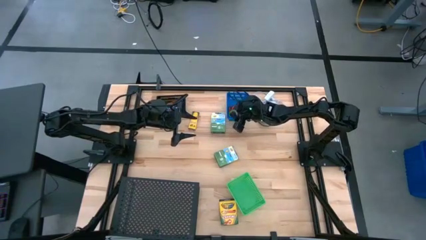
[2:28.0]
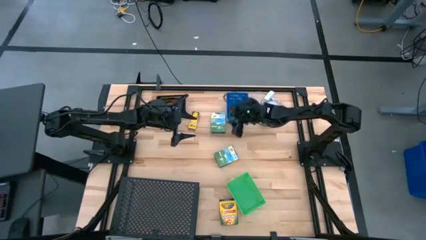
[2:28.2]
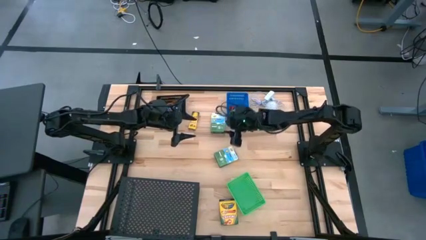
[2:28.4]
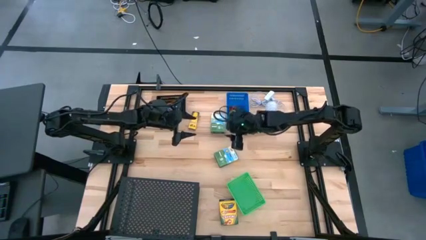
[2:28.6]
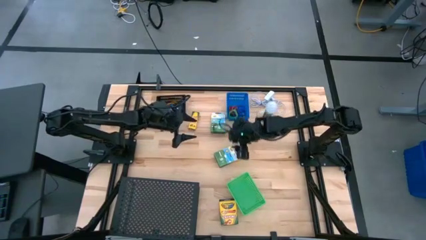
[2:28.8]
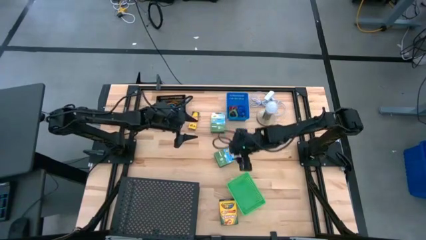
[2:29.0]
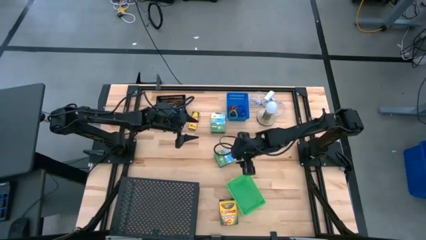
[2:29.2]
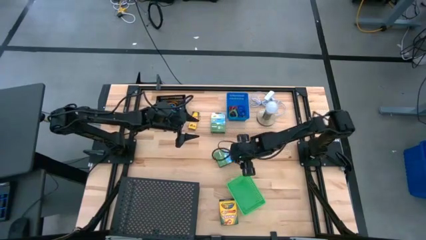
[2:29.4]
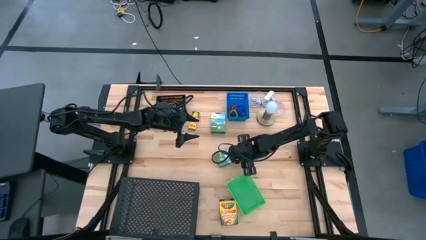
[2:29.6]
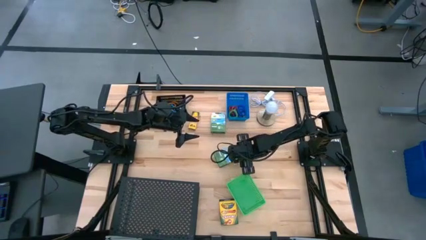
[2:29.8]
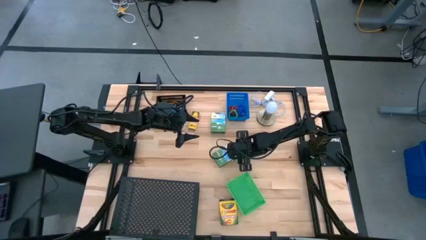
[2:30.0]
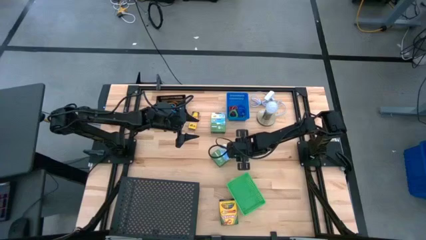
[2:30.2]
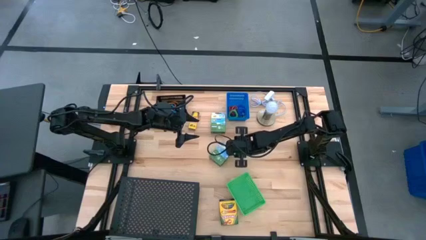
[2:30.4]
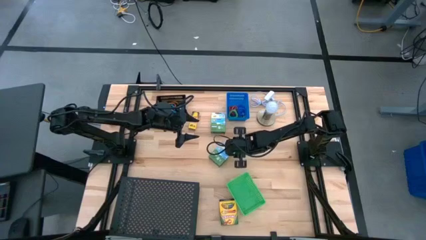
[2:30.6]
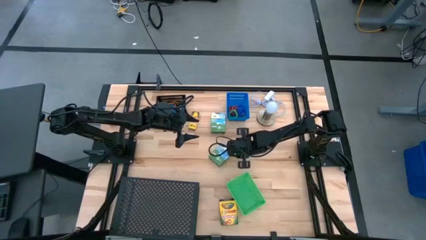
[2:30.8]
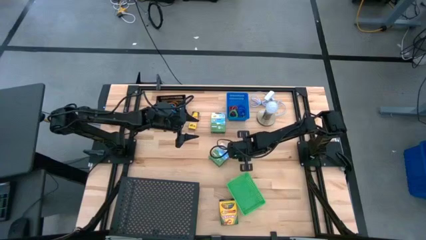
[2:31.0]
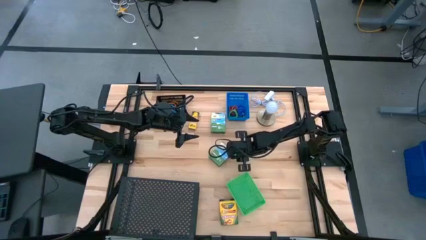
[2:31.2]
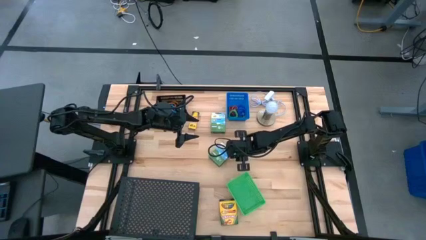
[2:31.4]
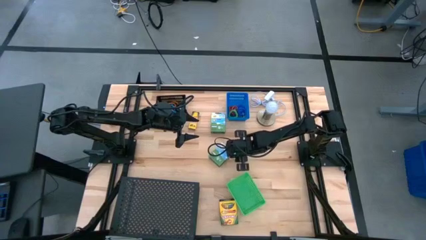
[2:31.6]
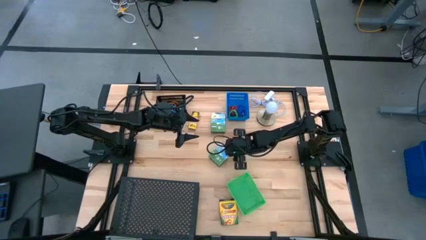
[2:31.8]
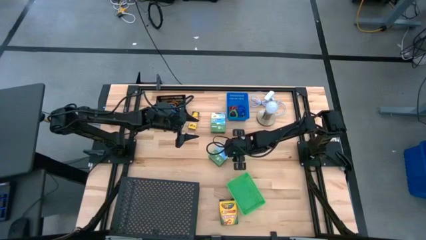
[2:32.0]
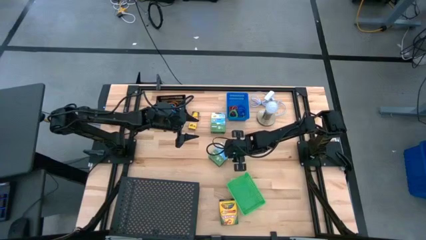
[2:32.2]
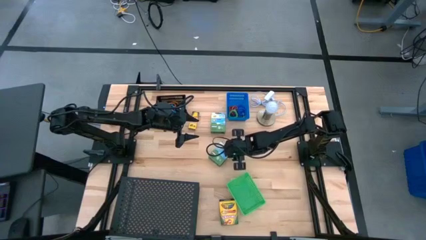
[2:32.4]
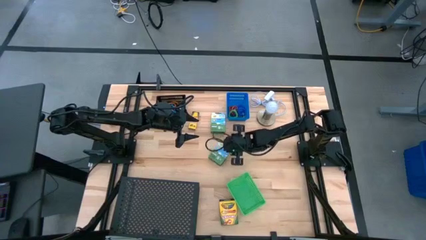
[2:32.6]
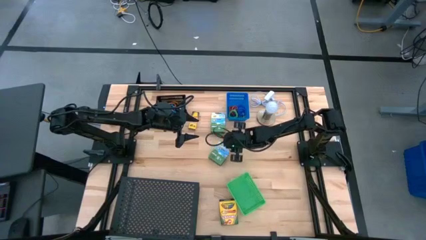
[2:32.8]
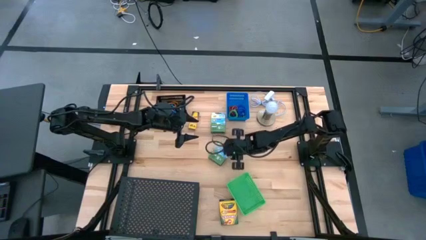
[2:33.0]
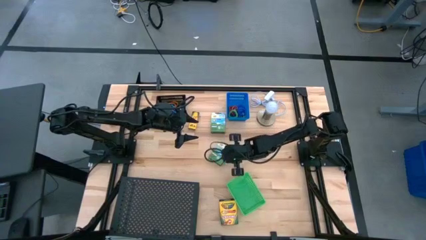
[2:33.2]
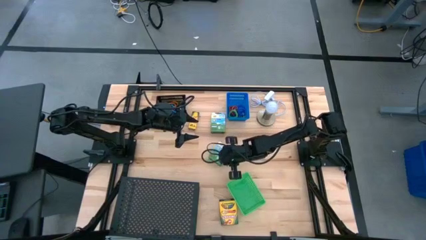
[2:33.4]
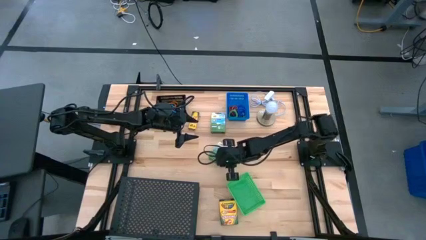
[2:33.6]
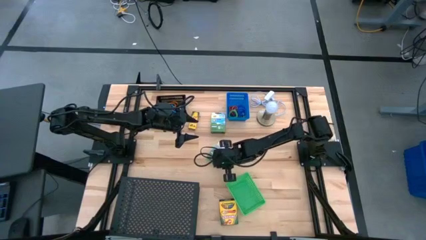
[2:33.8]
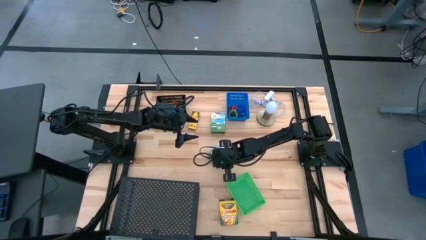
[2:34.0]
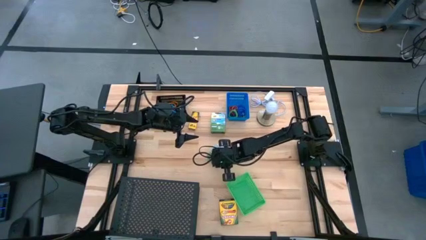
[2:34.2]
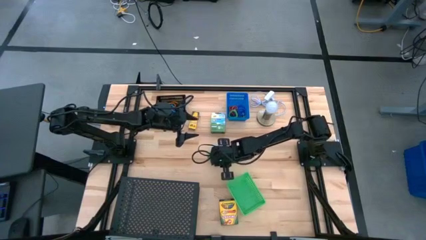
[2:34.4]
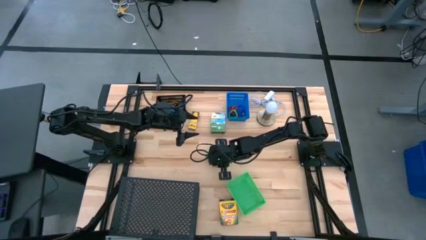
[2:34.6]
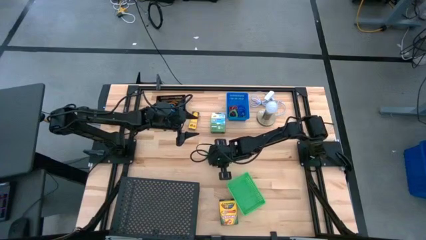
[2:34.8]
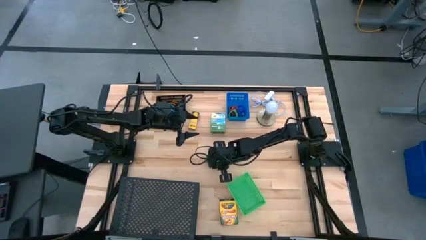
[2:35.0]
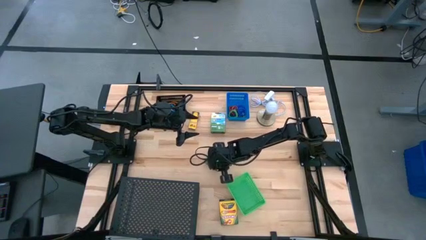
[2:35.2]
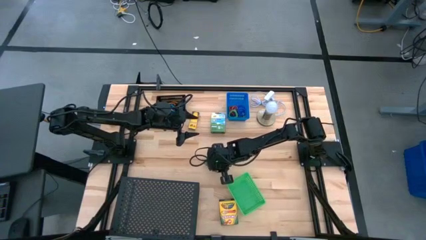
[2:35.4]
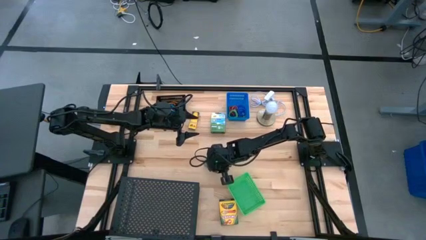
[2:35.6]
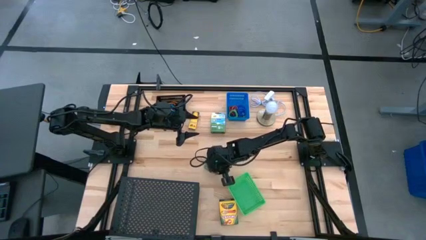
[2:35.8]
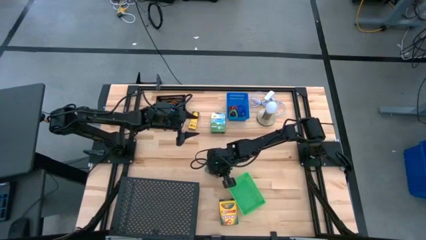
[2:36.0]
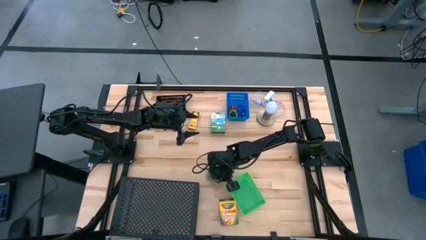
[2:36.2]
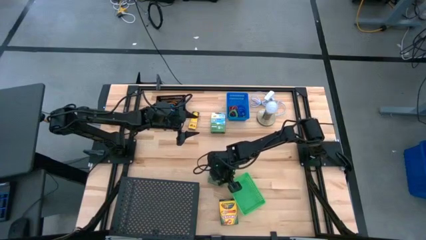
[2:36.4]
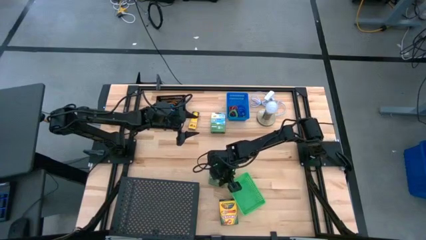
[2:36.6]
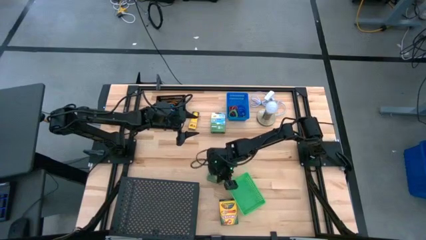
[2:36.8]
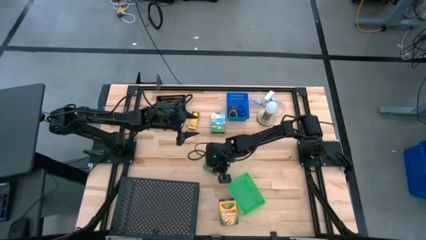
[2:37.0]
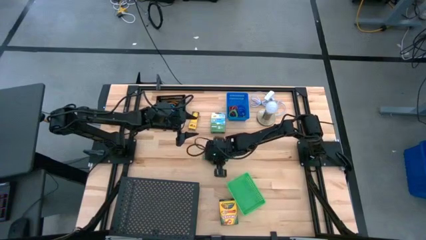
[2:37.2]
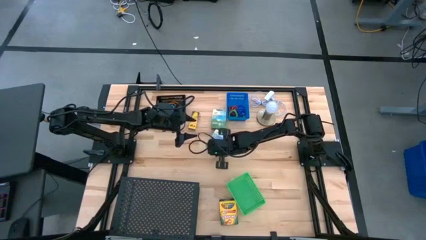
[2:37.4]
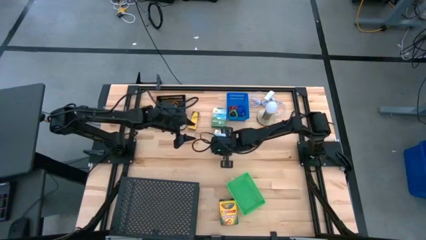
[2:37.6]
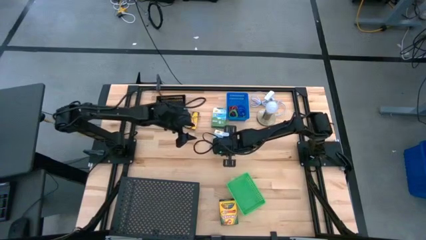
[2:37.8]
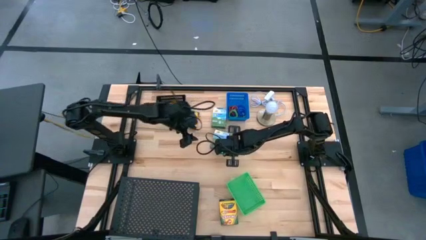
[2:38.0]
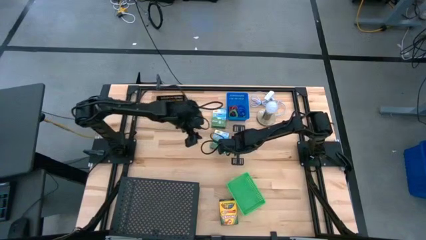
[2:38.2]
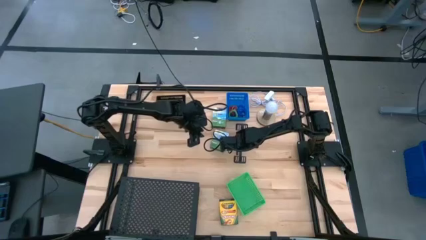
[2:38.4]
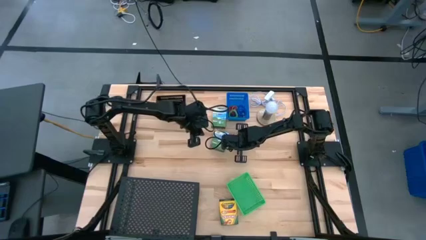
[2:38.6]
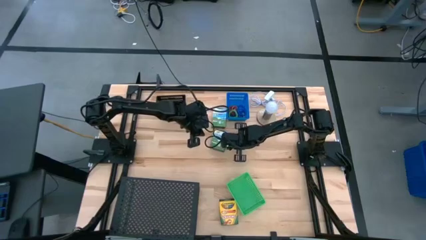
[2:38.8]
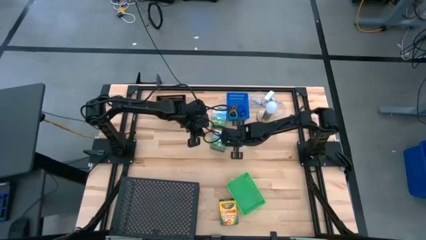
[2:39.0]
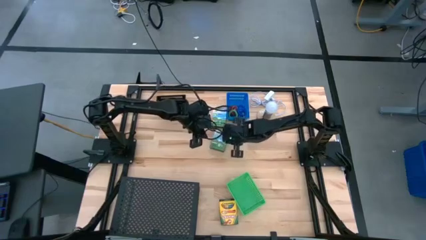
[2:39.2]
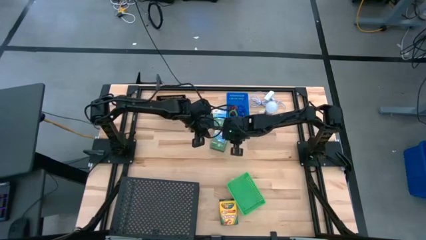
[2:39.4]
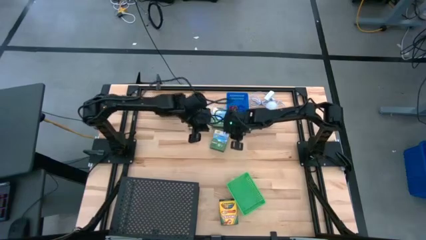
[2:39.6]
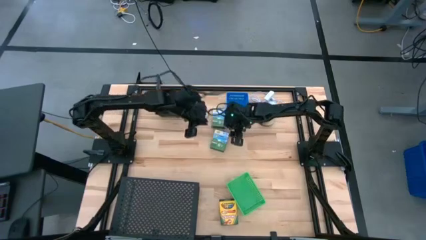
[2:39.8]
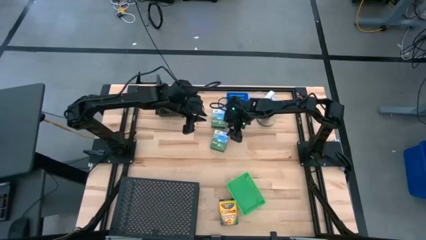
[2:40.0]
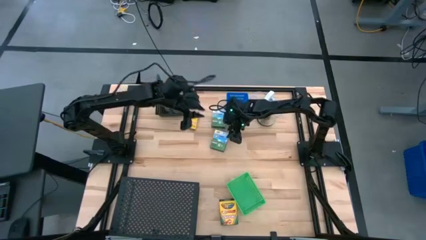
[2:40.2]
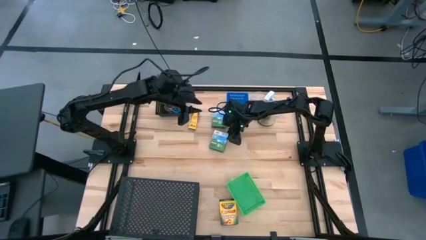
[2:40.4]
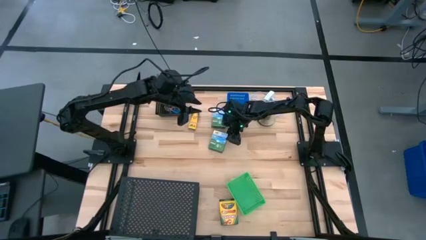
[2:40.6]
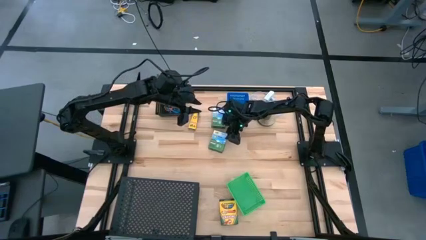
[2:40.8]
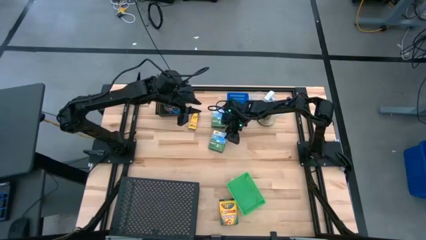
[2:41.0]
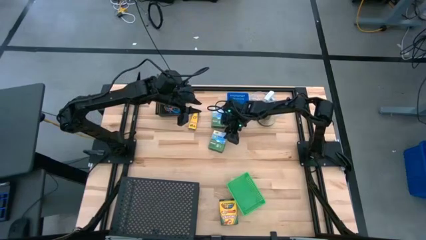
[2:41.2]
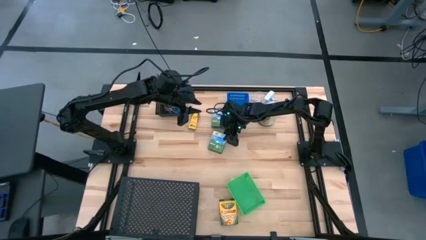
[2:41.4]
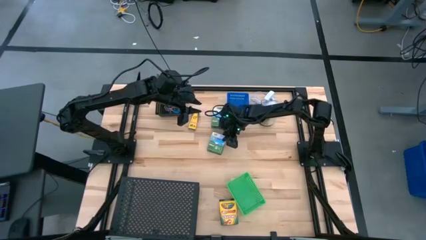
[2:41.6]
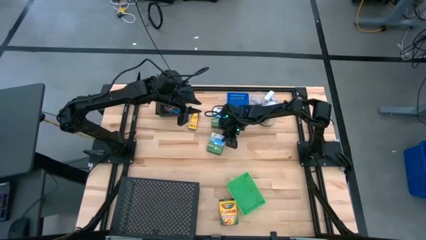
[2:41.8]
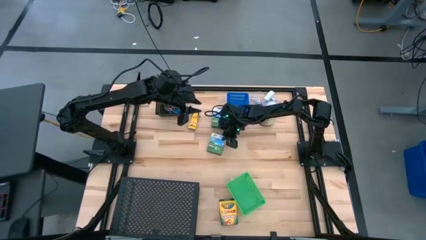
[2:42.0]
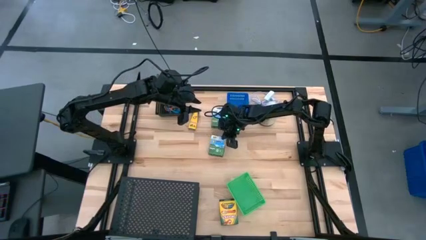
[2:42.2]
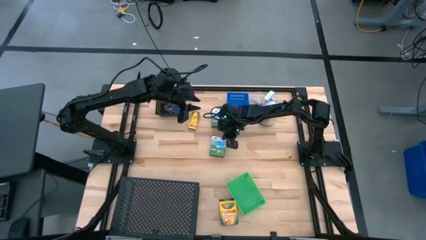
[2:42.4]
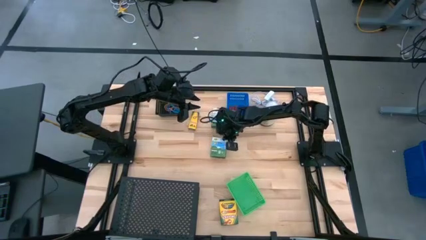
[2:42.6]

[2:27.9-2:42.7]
Task: Pick & Place Office Desk Supplies
Put the middle large crayon box into the green bin

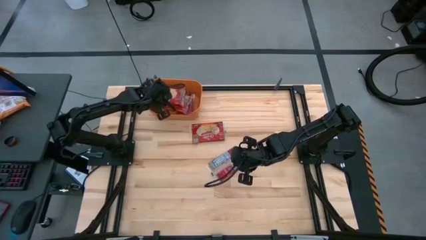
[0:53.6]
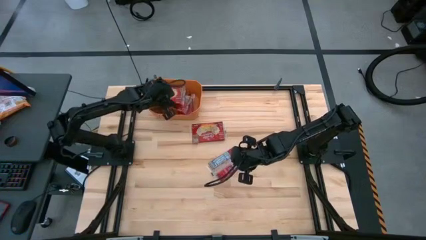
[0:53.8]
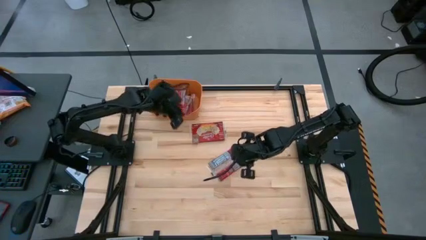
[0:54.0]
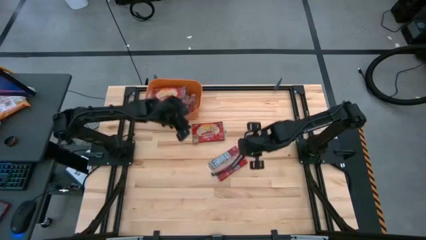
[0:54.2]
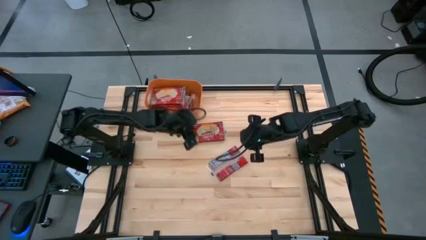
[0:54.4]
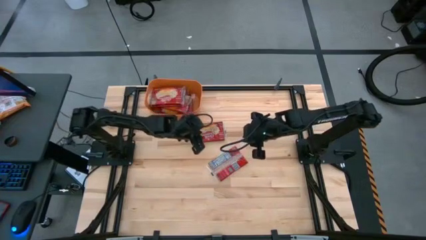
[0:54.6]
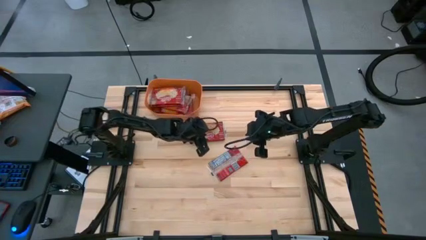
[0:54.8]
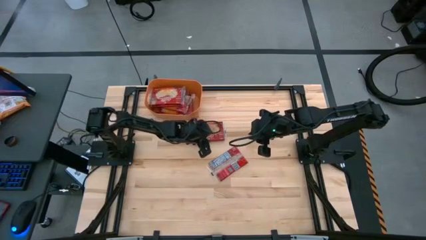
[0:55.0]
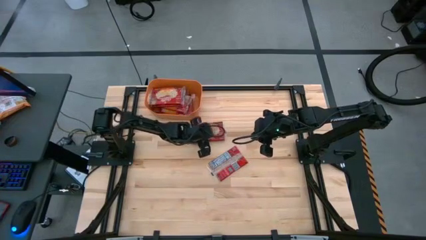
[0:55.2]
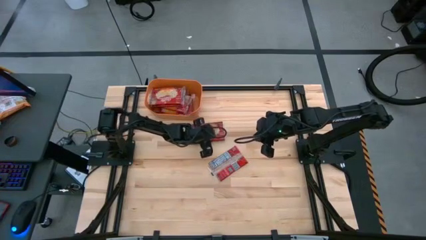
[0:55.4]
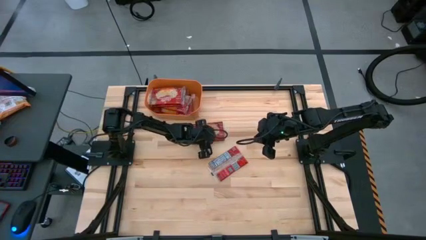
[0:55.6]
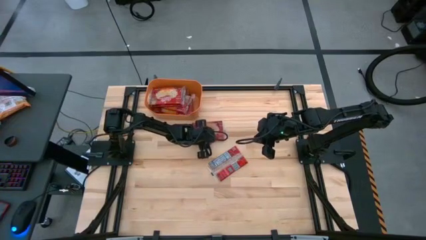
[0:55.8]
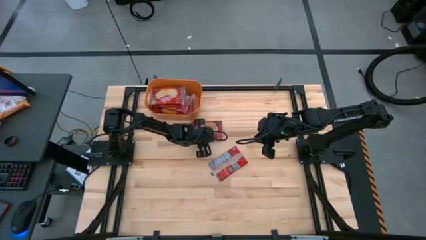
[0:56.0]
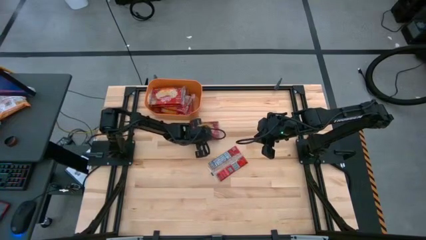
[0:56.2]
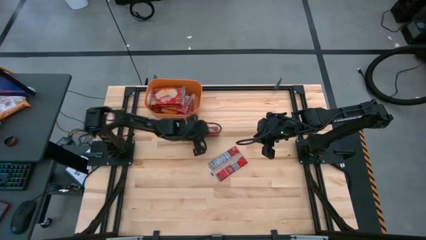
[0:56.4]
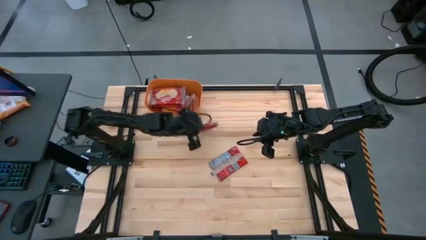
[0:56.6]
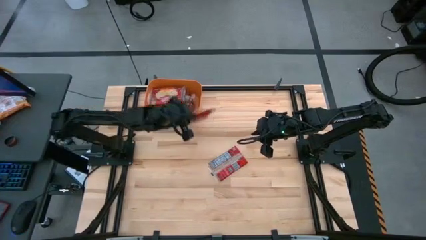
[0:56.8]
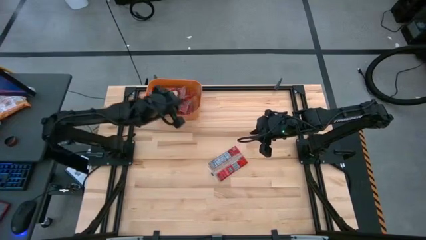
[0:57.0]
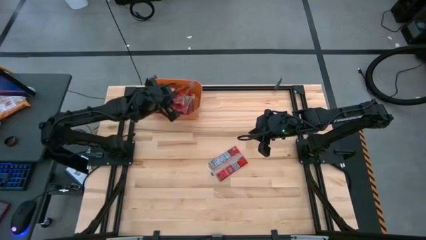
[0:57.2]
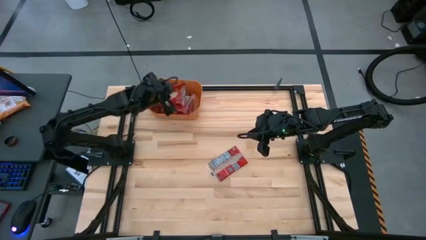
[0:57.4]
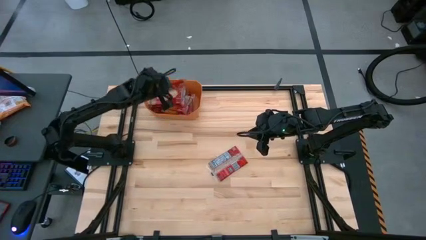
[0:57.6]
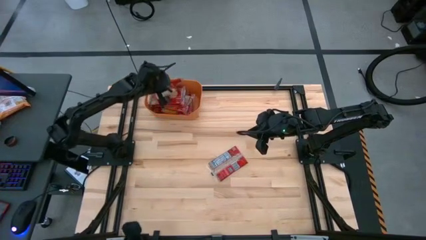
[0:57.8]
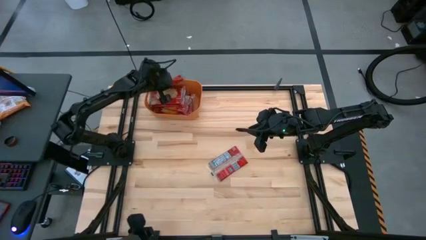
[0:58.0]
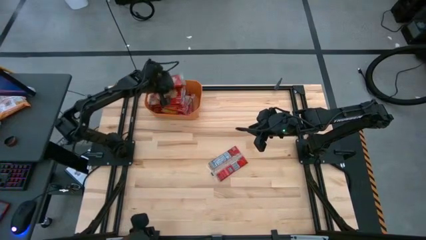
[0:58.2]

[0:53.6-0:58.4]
Task: Sort popcorn bags into baskets
Put the red popcorn bag into the orange bin
